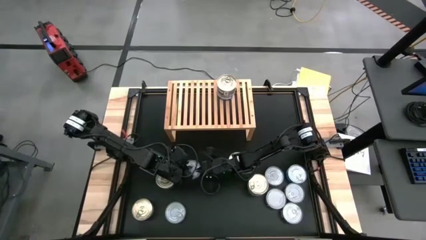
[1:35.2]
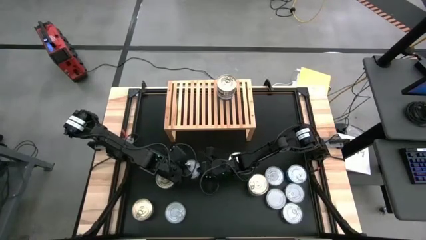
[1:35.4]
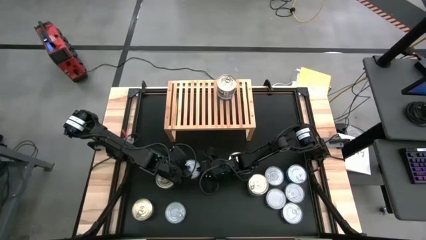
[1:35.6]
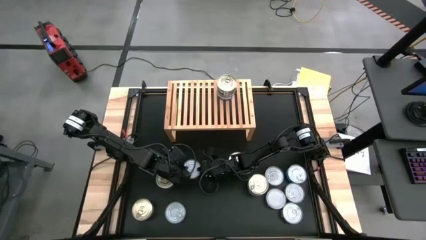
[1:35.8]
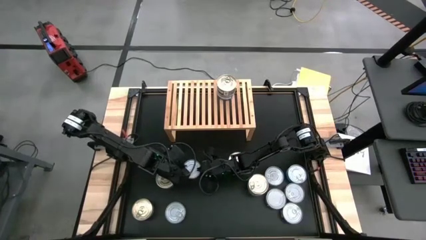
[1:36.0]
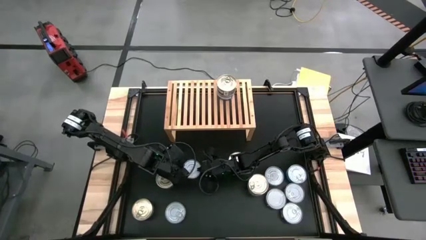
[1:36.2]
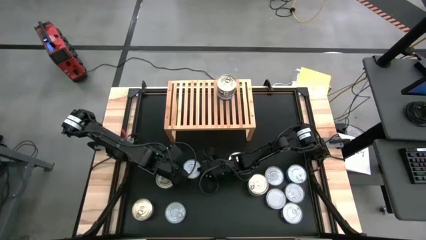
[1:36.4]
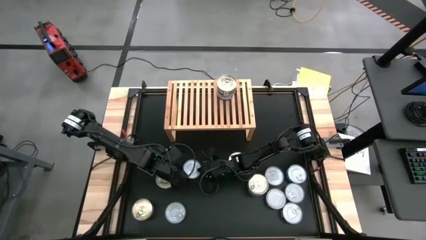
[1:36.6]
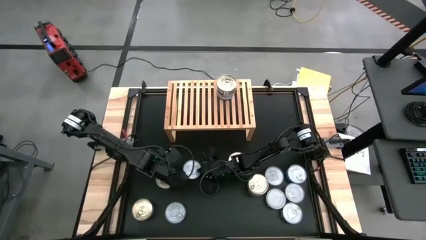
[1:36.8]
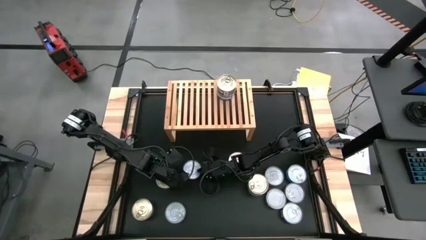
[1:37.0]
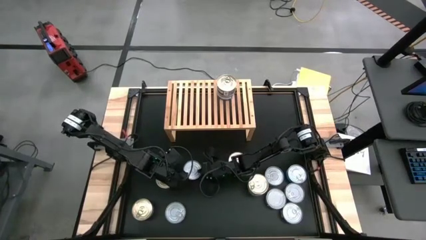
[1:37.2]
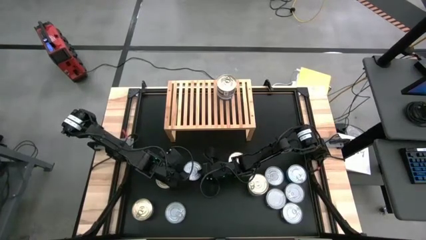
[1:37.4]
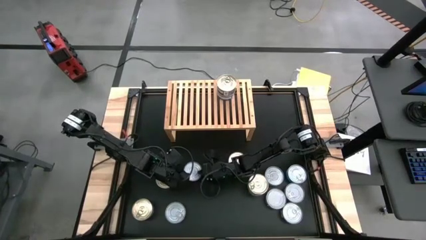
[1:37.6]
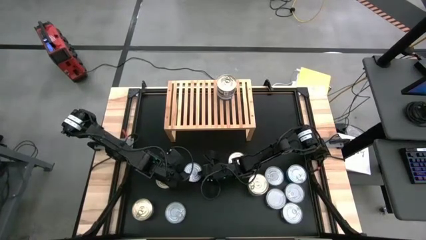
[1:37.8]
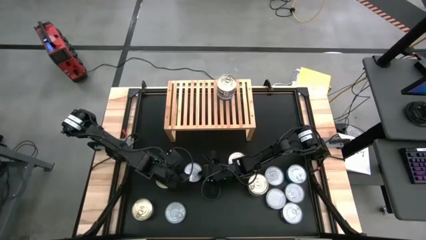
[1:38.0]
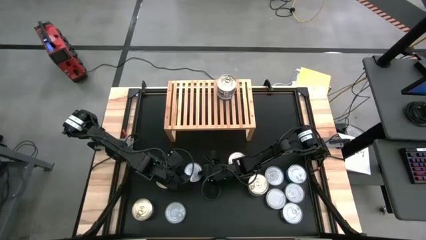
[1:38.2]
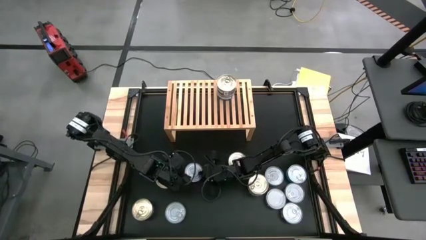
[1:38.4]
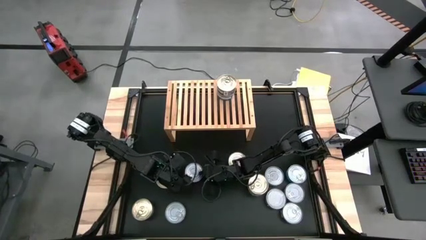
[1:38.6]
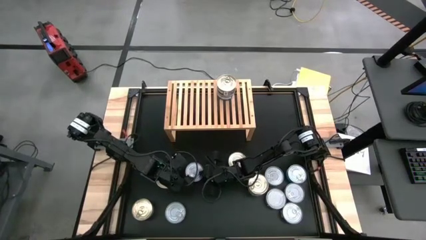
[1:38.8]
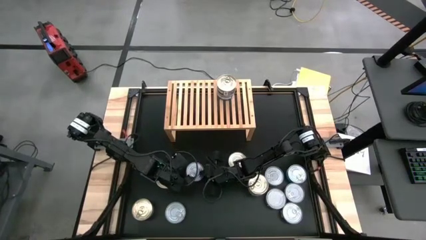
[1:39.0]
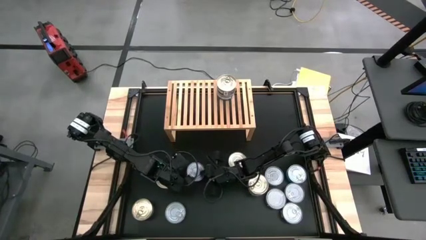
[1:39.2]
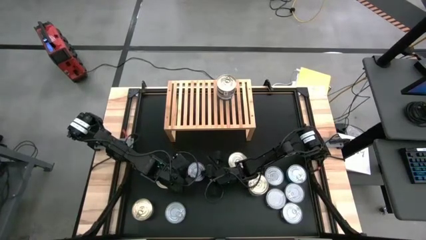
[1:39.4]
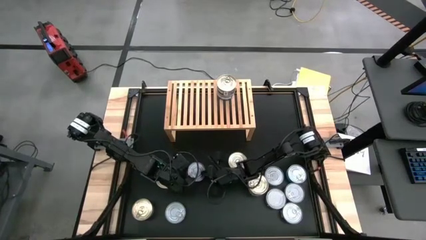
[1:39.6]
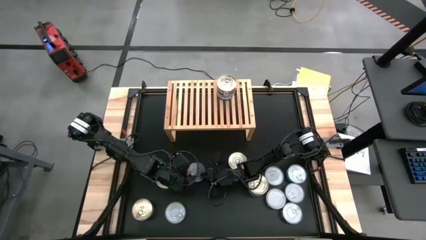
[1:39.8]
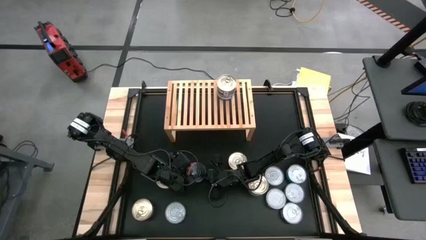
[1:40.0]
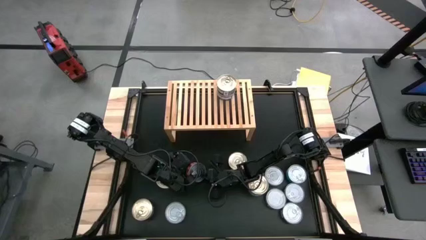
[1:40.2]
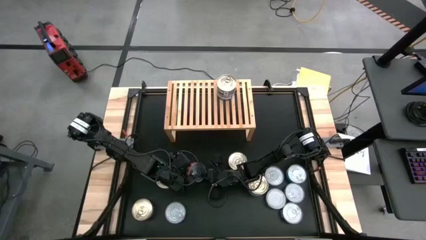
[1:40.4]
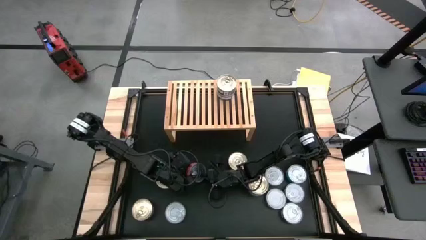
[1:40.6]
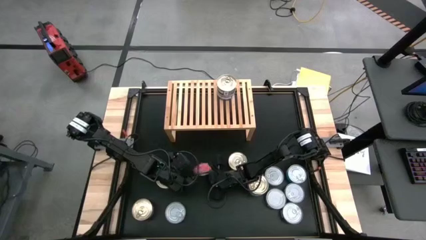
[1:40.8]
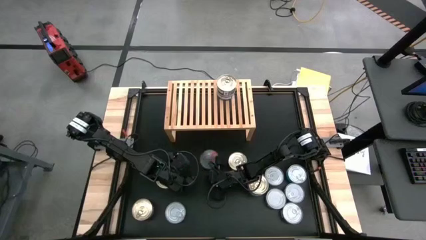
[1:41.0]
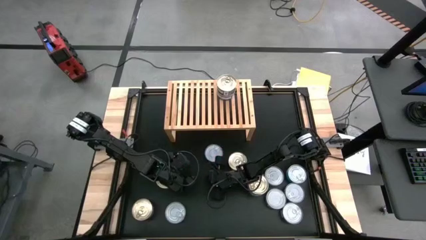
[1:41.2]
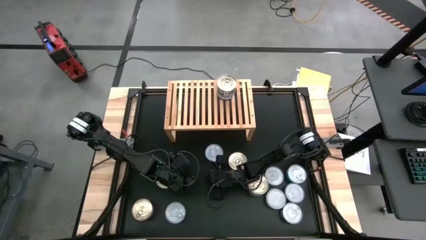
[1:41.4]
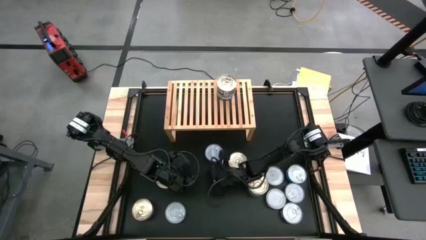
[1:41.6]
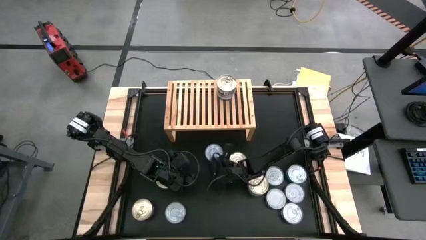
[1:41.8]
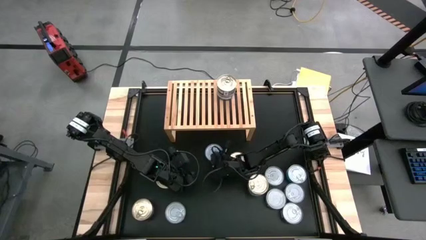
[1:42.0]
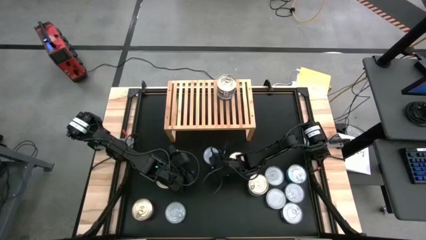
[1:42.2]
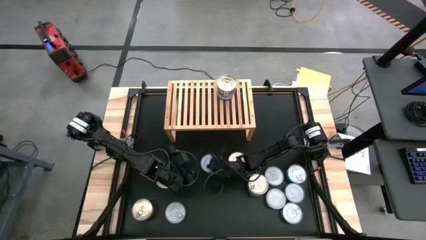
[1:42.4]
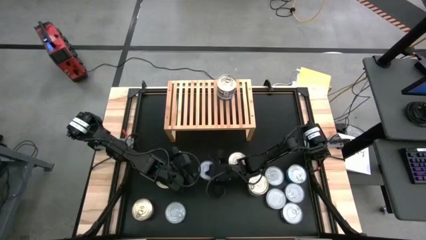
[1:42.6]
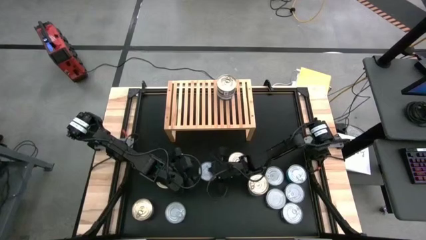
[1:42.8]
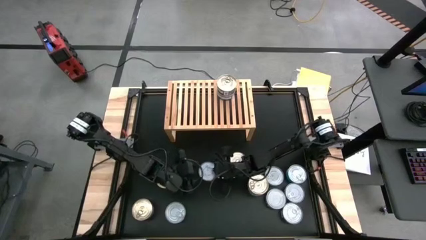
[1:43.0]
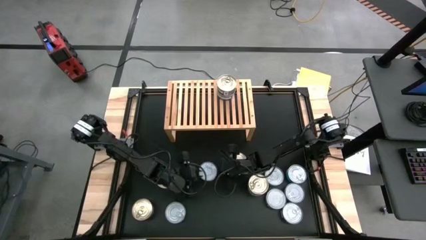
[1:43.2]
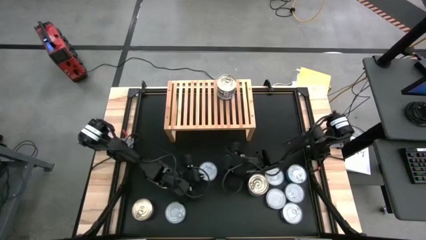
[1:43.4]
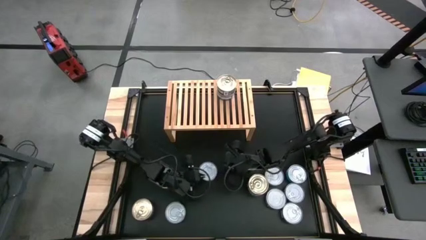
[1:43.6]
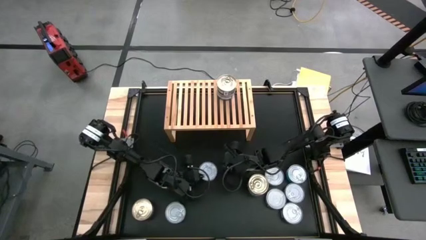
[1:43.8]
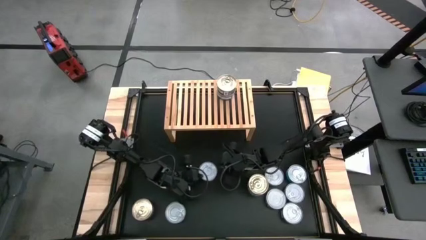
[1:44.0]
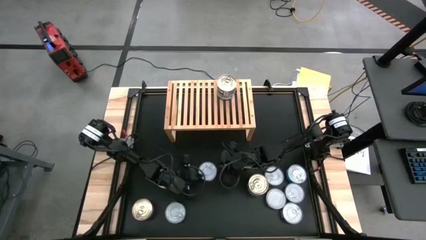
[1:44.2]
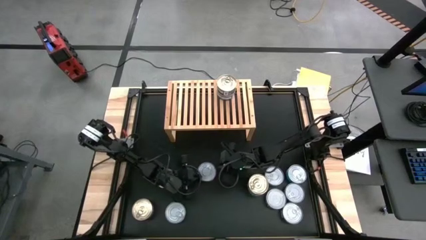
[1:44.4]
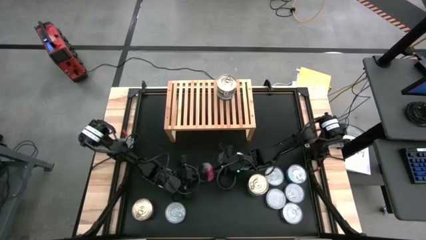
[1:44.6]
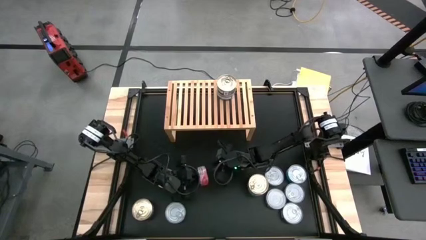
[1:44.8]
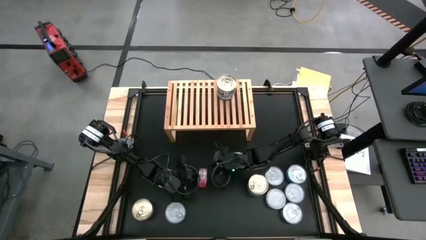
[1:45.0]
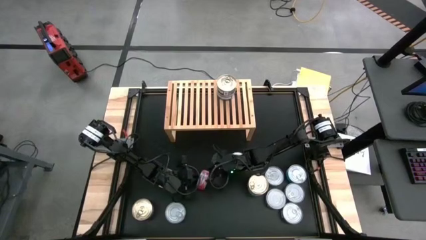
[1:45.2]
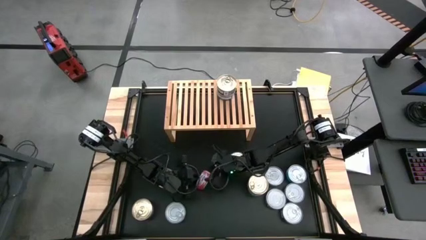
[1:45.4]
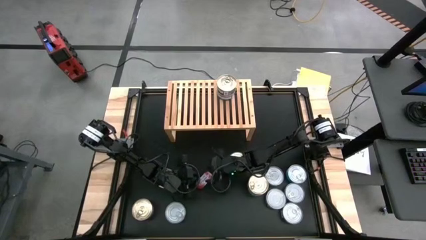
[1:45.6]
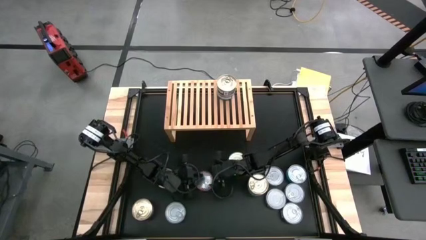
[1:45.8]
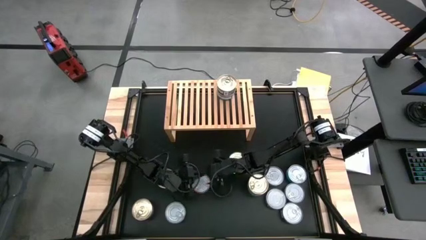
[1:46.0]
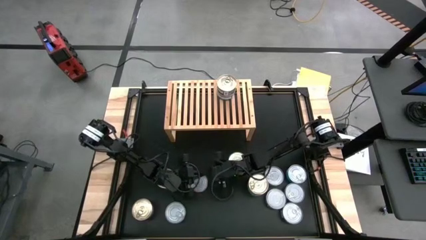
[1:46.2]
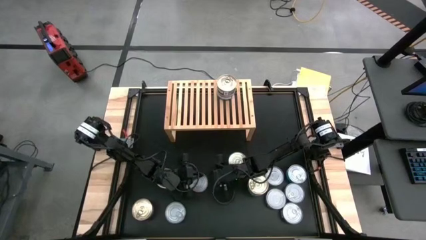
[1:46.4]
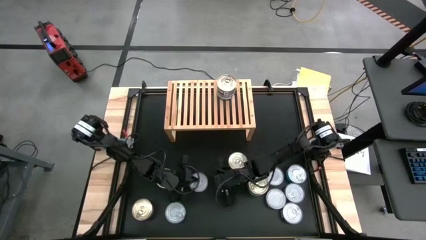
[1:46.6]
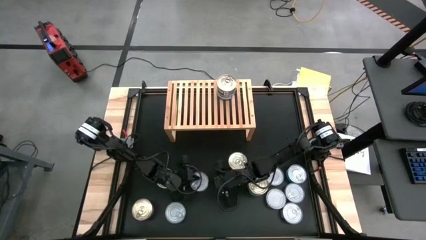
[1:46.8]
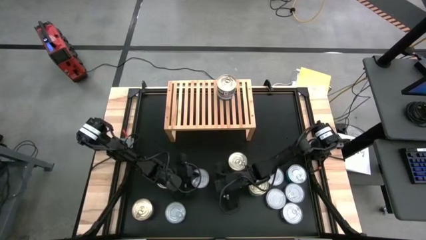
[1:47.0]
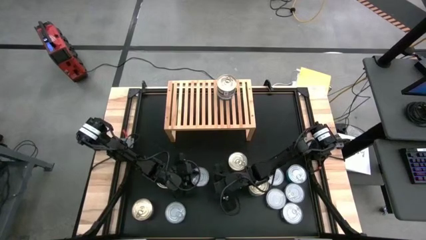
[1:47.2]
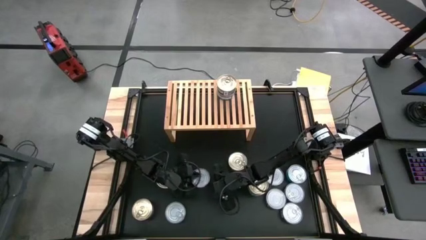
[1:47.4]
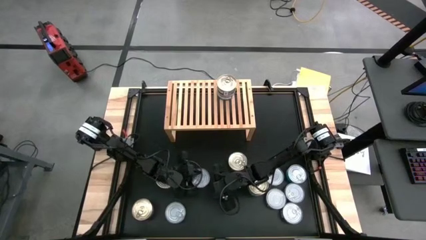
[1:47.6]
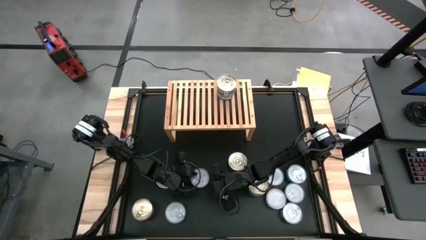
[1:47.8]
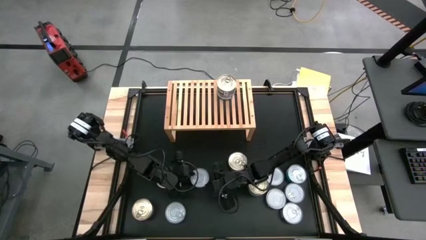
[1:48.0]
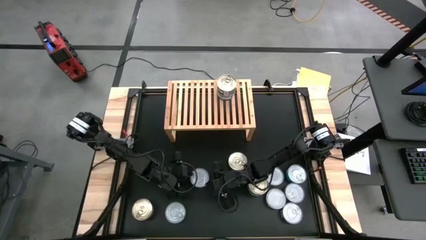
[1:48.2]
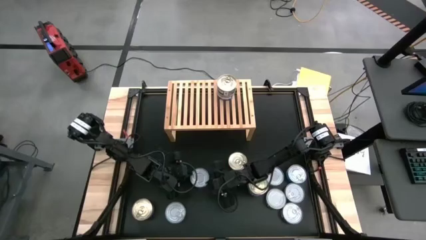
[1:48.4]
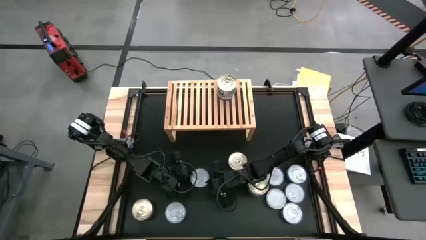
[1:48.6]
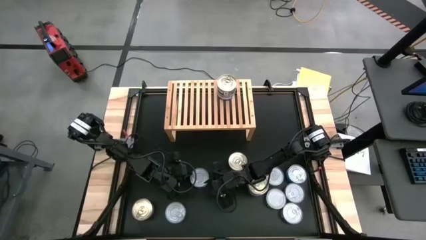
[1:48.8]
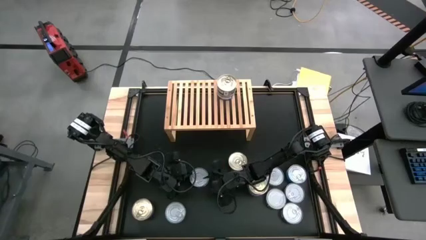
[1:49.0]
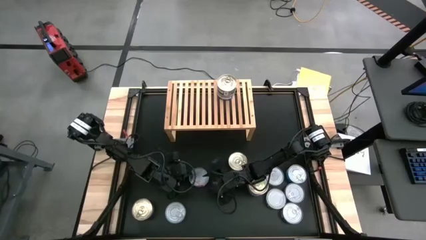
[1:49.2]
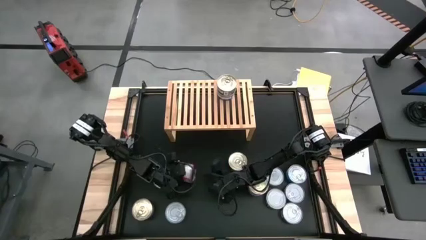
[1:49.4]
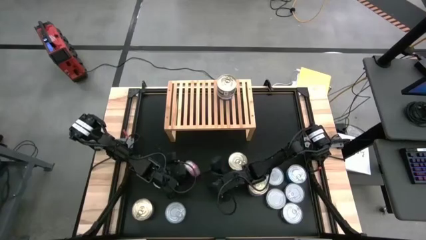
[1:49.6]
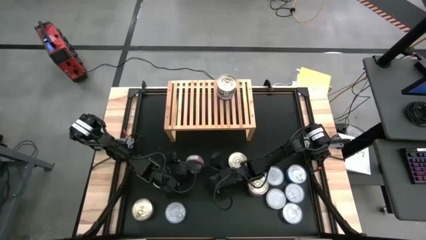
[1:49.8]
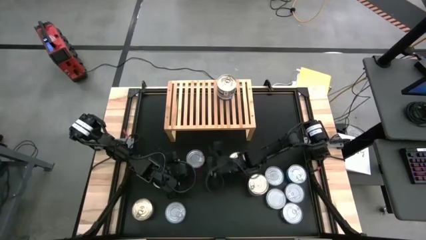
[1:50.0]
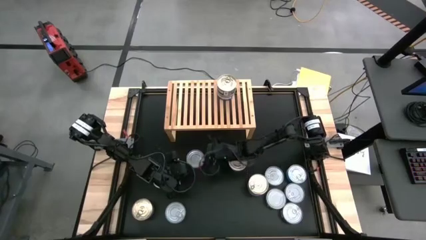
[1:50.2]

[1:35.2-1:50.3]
Task: Stack canned seafood by type on shelf
Put the red tuna can on the shelf
